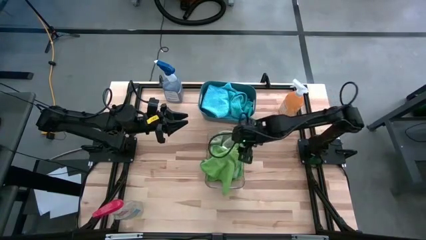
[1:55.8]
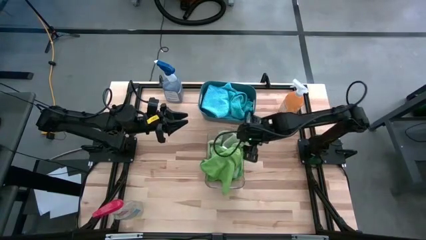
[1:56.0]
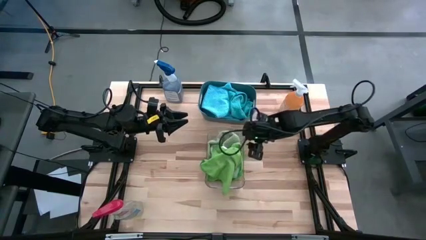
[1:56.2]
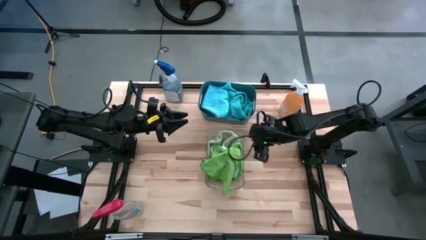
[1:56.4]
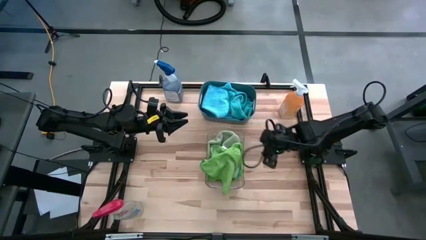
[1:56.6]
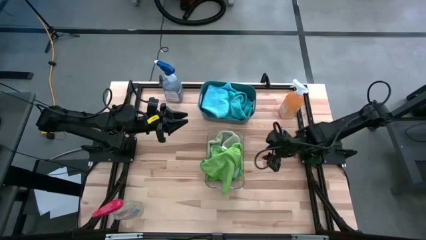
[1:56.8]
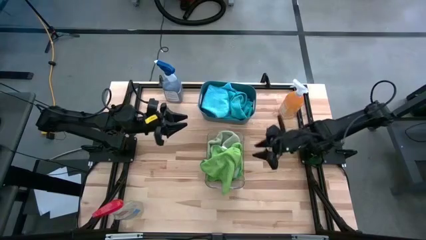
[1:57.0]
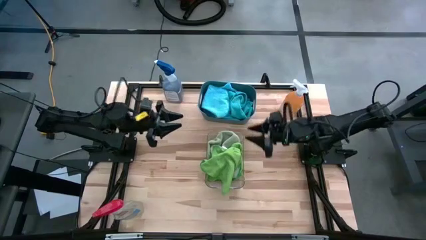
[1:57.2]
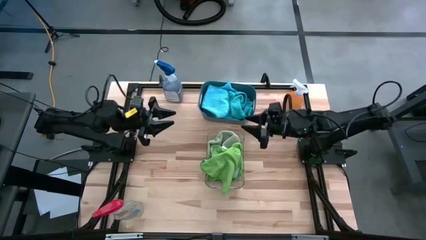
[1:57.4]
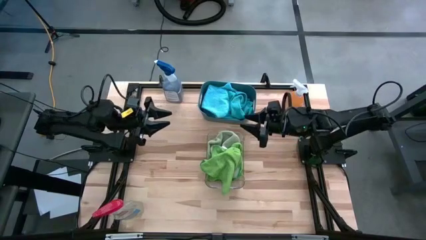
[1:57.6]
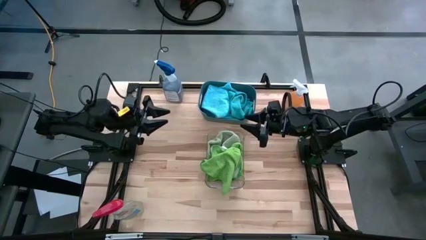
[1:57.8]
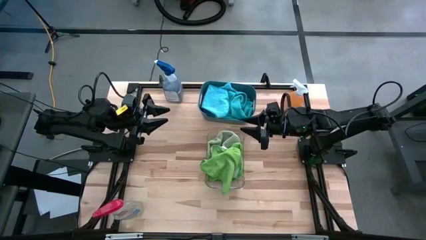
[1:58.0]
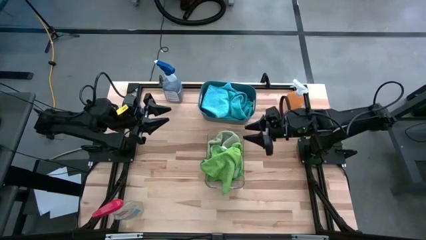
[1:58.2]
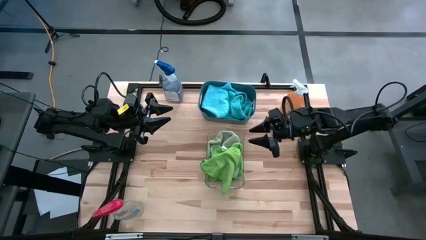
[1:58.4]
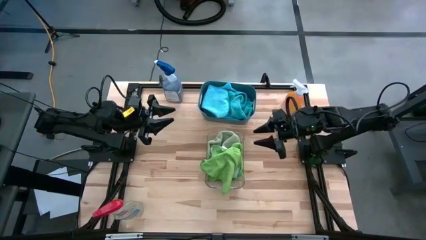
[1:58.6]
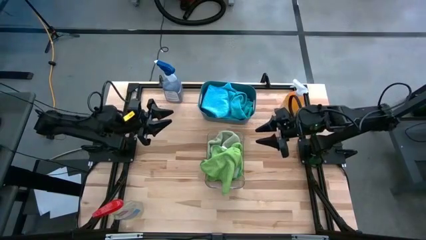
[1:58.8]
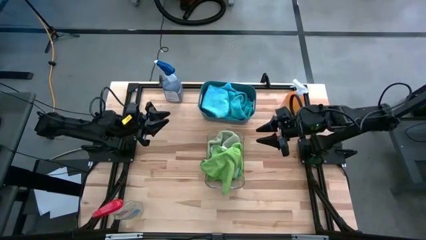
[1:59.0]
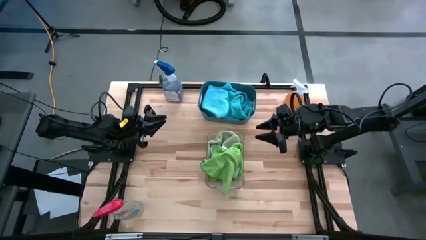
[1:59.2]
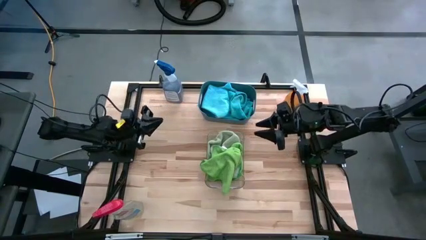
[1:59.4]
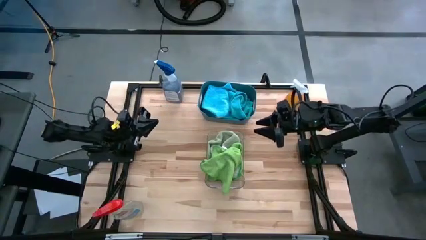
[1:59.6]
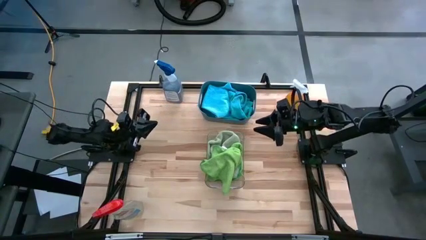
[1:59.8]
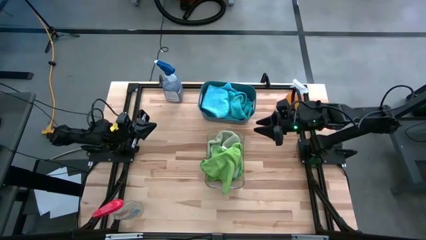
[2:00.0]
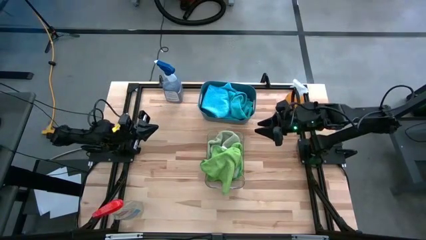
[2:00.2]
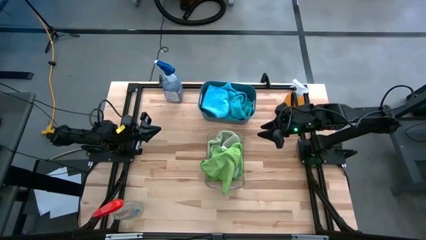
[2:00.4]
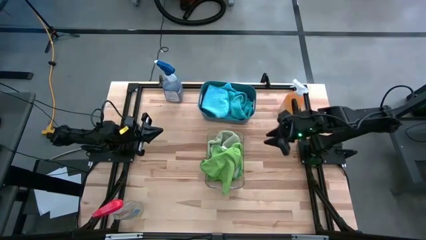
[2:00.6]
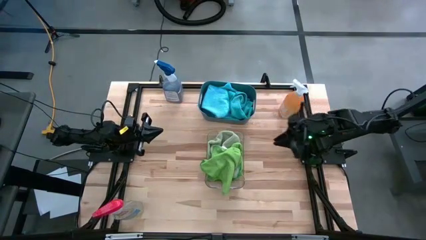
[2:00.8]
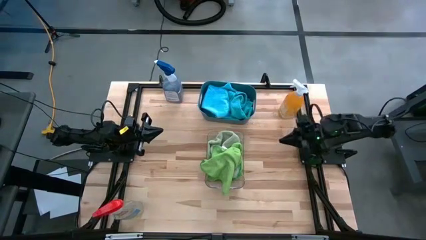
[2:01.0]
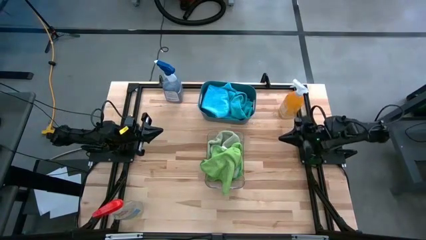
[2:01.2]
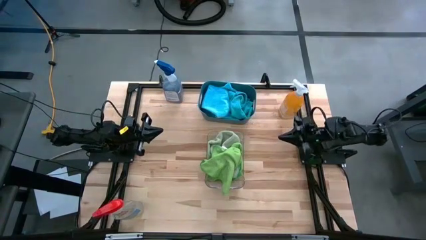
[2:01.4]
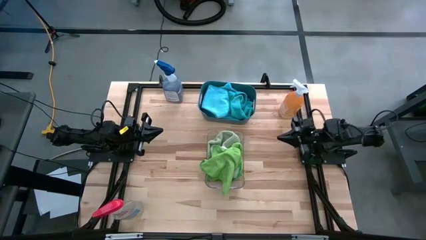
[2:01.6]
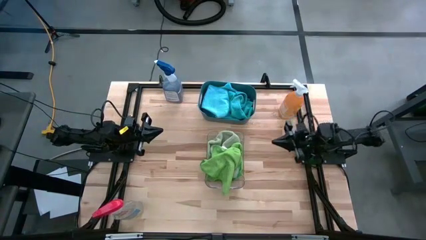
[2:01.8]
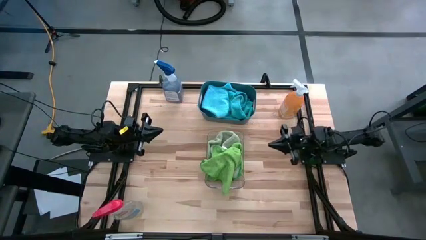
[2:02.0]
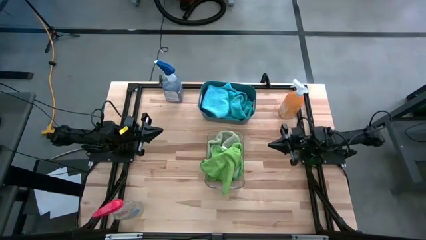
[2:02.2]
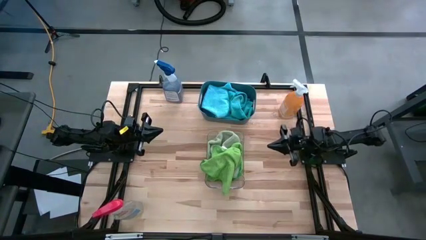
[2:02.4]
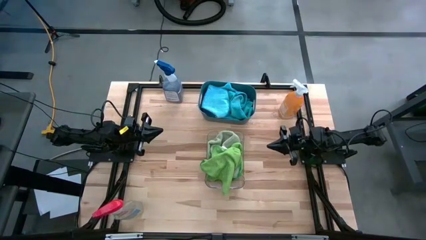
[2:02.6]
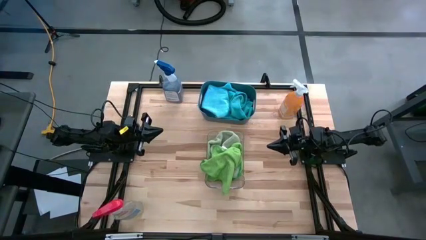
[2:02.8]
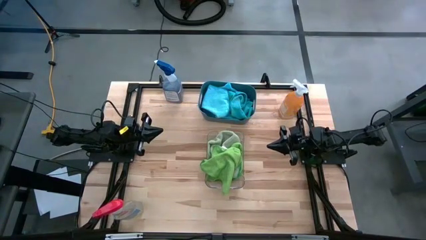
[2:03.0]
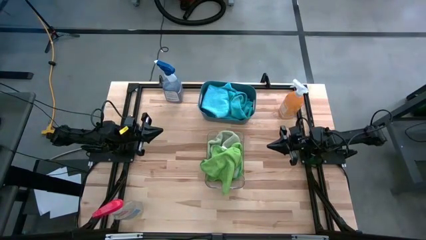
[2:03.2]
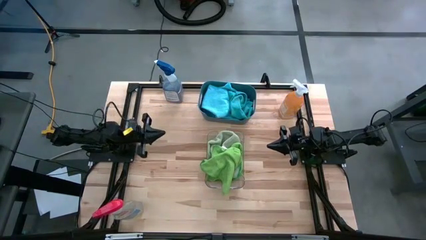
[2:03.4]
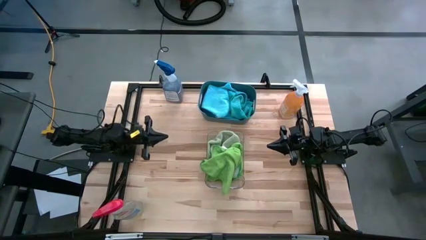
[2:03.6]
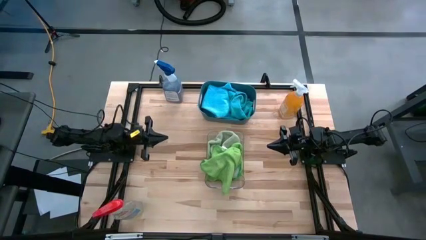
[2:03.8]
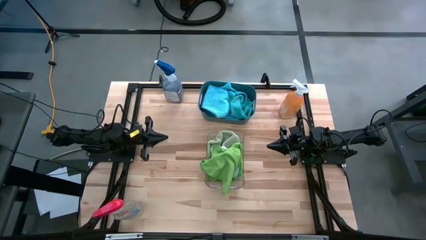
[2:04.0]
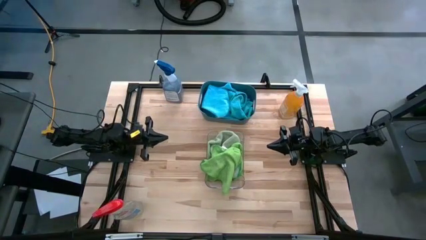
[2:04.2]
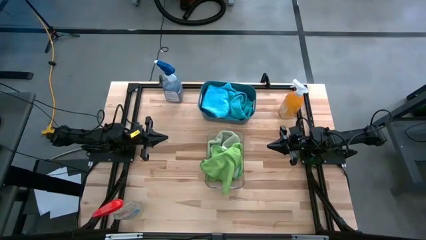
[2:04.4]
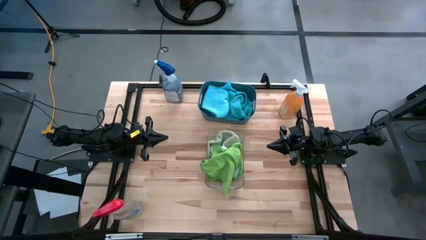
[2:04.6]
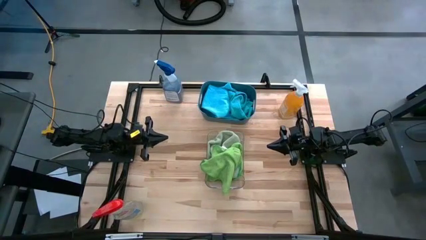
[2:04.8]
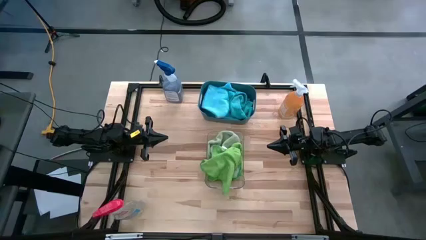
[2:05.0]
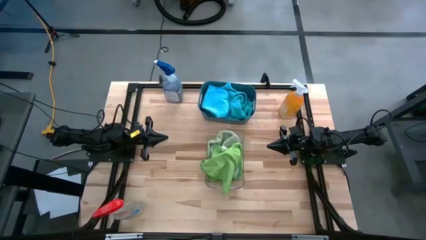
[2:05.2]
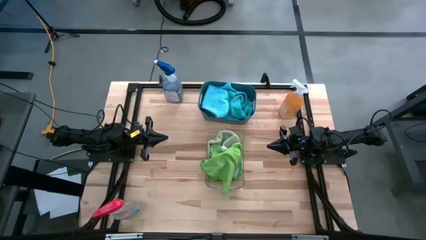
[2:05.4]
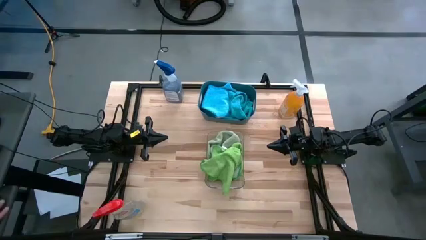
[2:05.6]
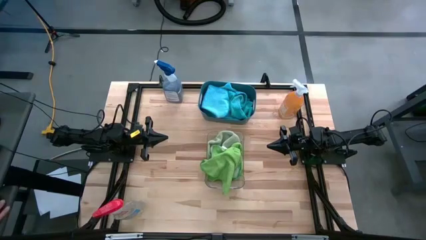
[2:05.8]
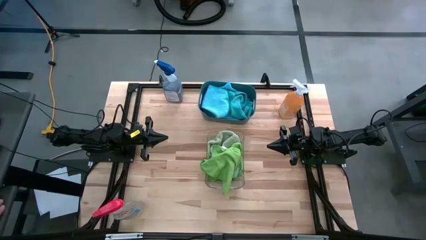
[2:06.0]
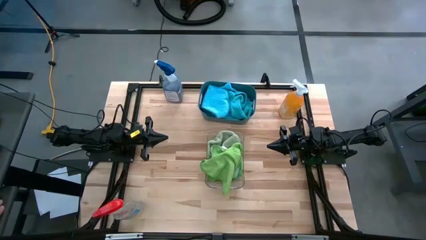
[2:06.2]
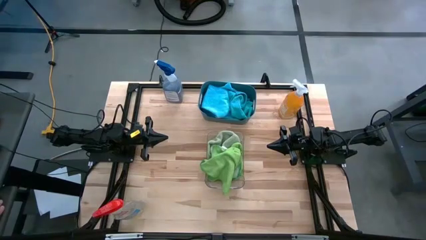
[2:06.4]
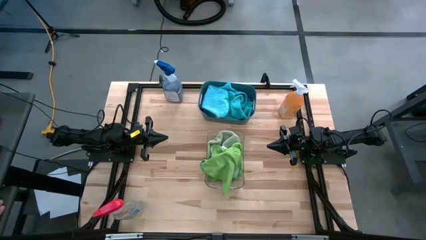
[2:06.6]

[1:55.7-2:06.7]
Task: Sort microfiber towel by color & place in baskets
Return to Home Position

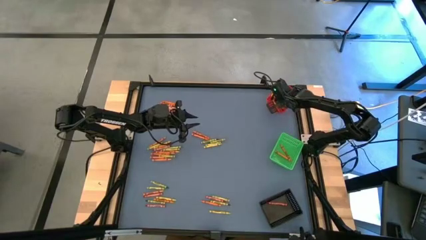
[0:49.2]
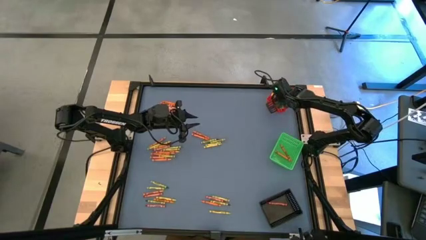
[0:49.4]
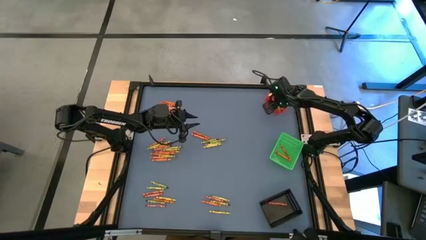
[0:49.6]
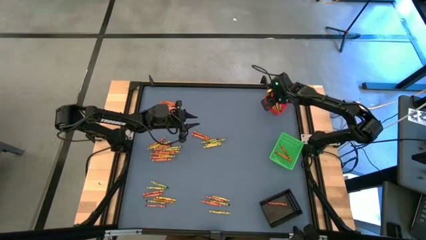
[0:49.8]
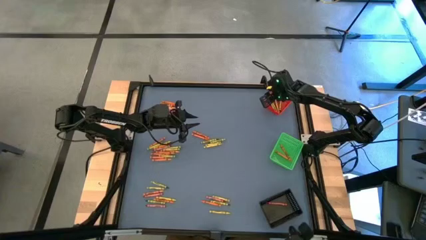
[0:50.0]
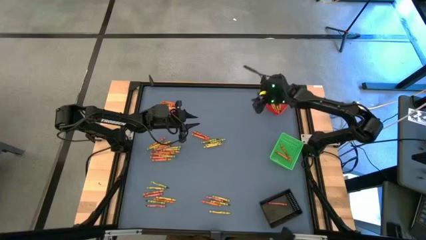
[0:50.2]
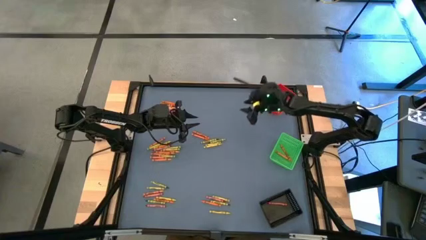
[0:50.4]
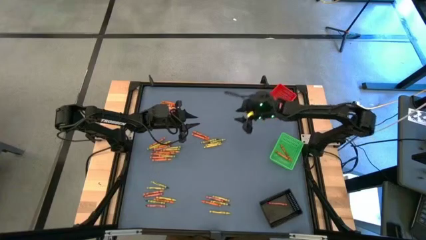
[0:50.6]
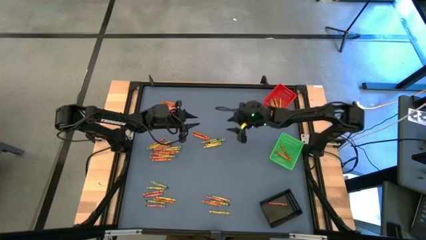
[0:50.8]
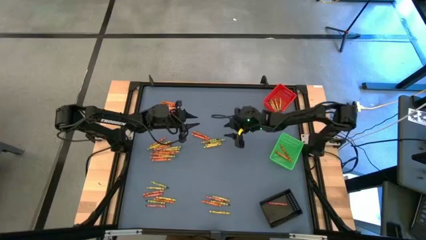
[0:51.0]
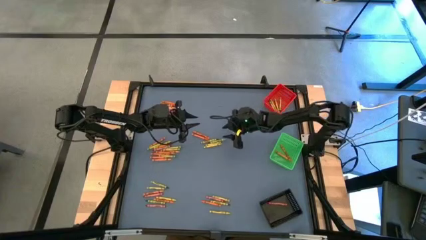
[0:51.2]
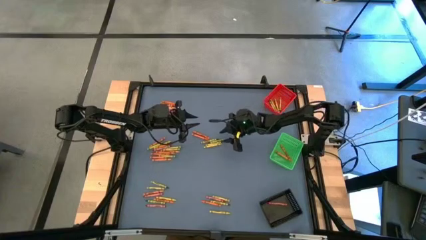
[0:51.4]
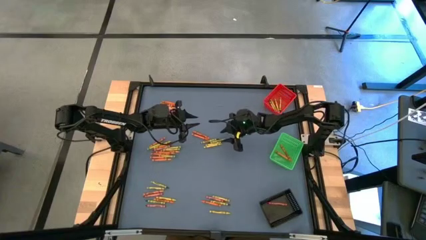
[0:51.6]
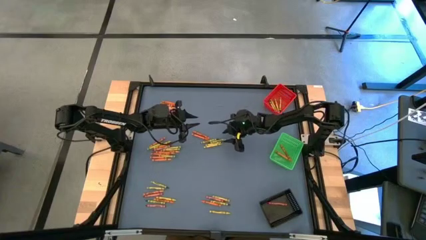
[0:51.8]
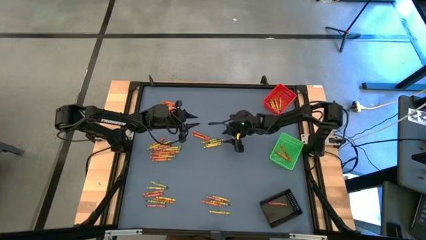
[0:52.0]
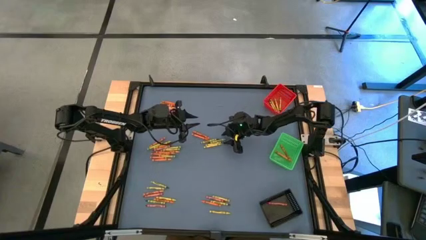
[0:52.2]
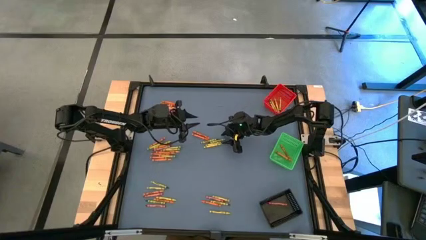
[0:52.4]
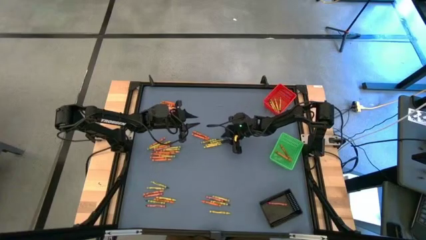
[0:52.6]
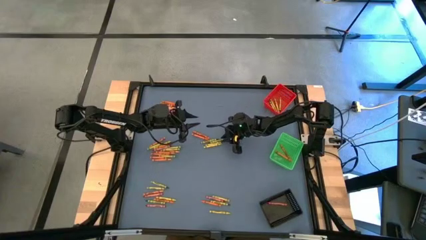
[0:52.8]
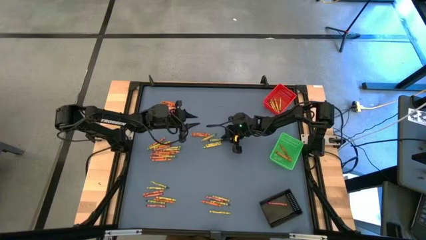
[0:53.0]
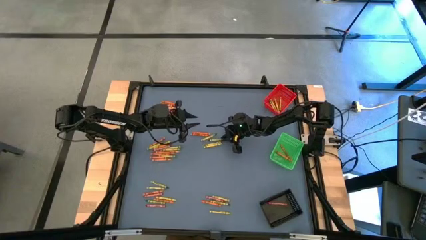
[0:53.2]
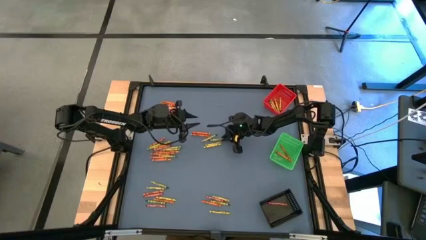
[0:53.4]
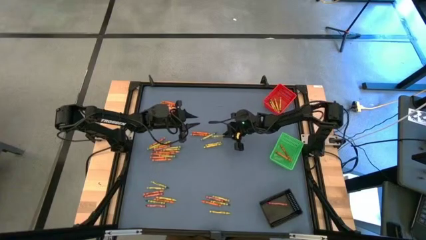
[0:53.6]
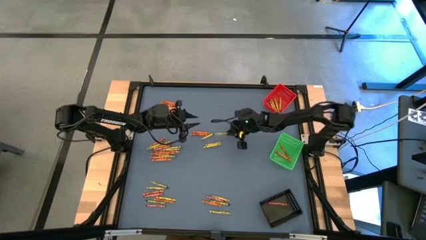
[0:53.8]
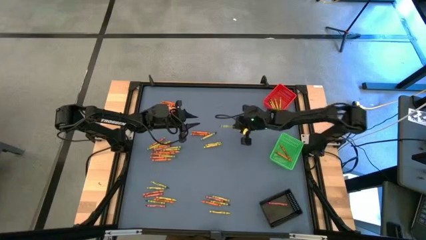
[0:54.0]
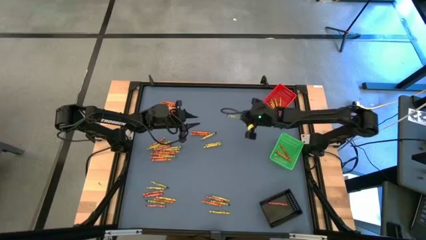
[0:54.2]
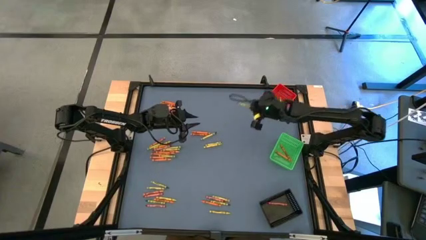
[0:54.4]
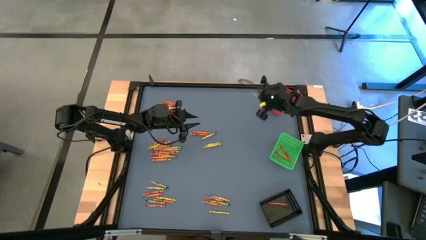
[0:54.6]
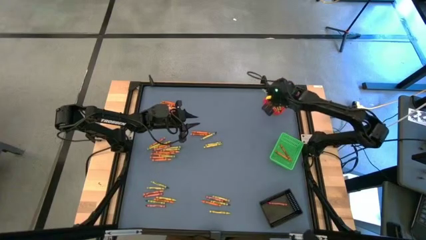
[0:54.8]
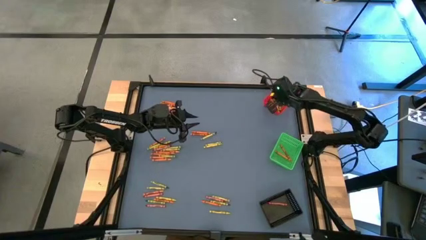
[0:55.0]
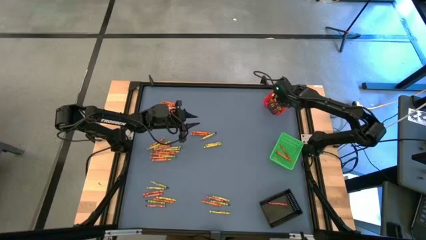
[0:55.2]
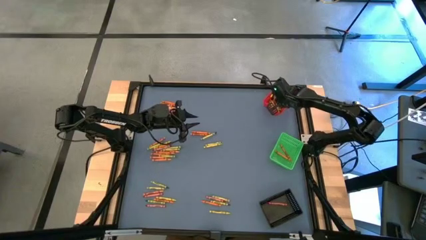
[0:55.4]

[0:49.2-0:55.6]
Task: Sort crayons
Put the green crayon into the red bin
